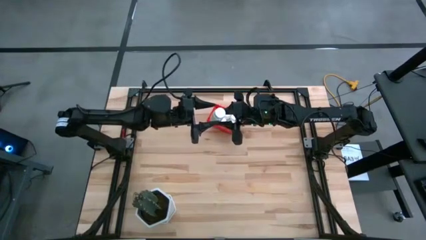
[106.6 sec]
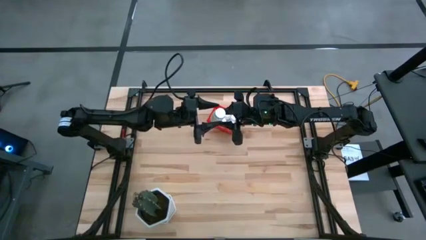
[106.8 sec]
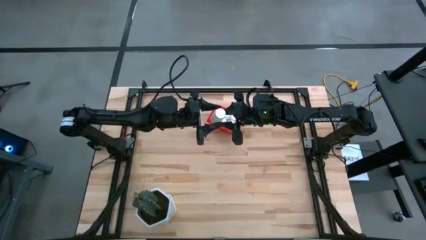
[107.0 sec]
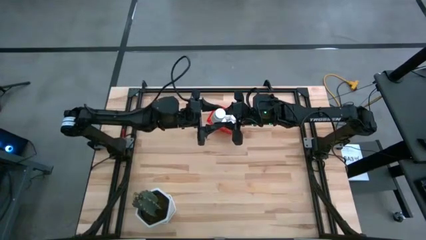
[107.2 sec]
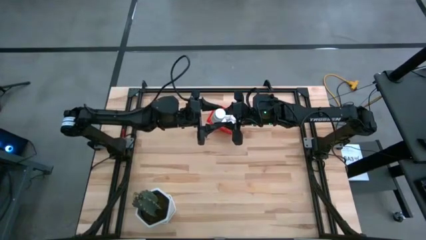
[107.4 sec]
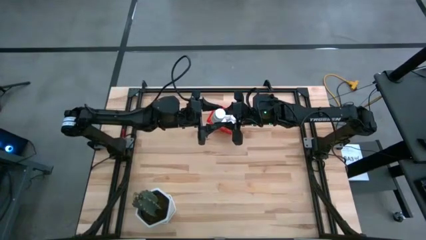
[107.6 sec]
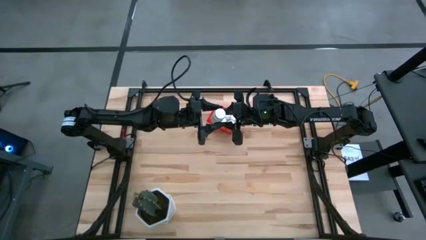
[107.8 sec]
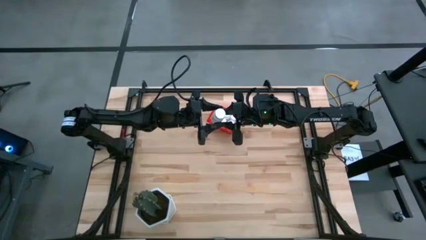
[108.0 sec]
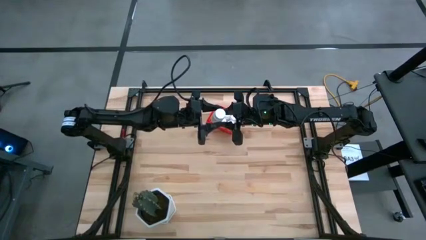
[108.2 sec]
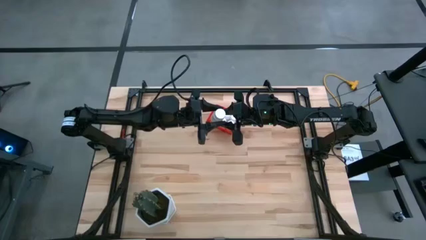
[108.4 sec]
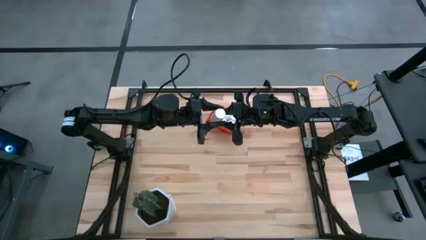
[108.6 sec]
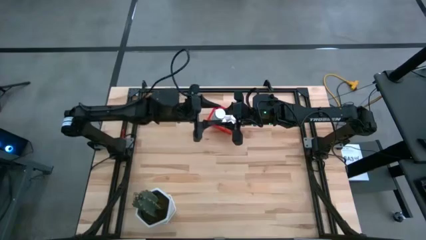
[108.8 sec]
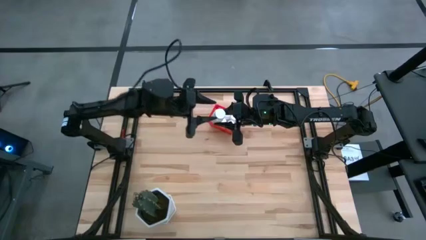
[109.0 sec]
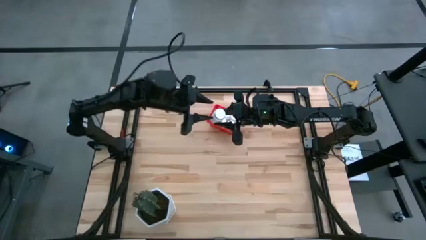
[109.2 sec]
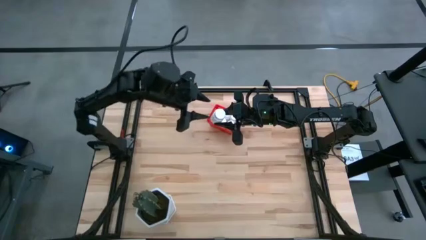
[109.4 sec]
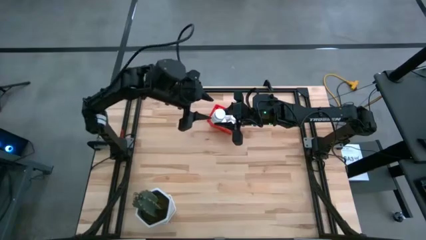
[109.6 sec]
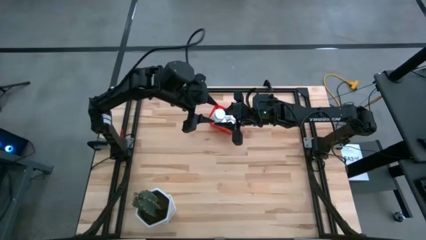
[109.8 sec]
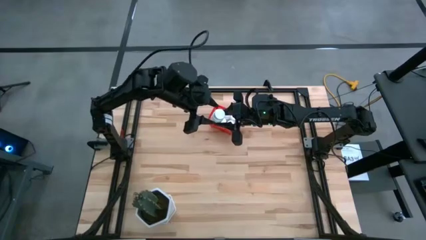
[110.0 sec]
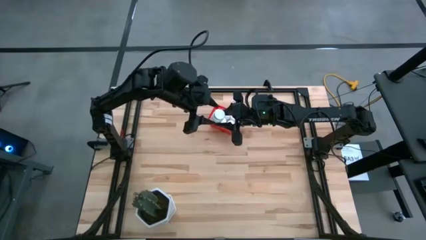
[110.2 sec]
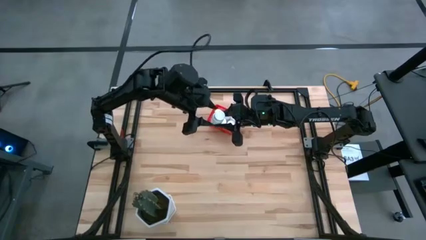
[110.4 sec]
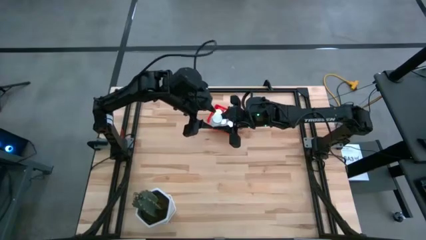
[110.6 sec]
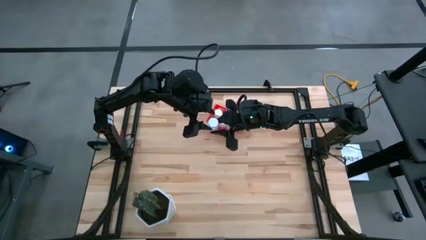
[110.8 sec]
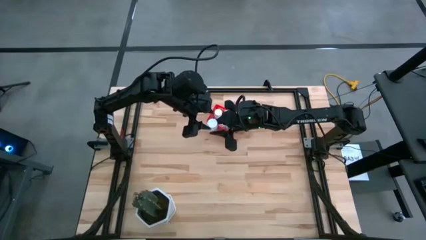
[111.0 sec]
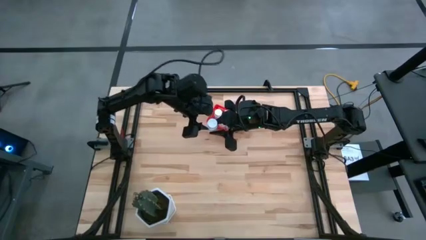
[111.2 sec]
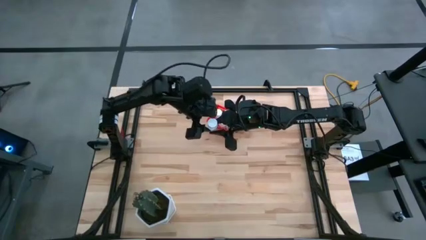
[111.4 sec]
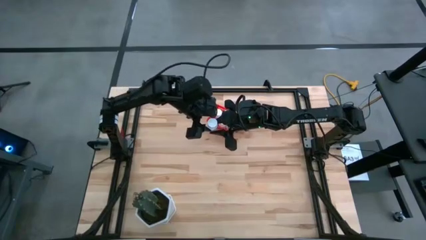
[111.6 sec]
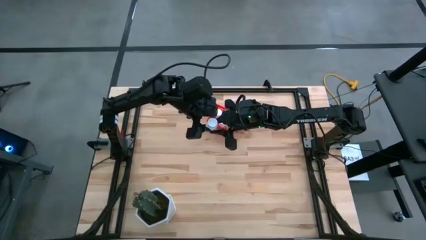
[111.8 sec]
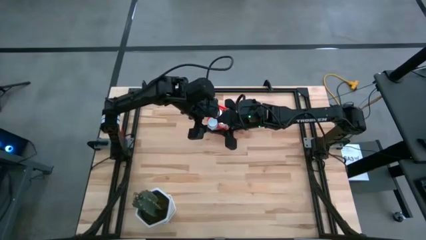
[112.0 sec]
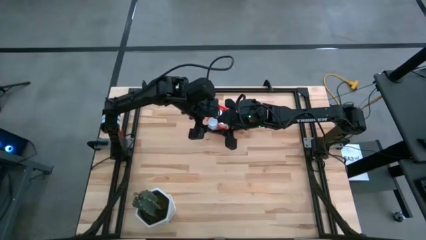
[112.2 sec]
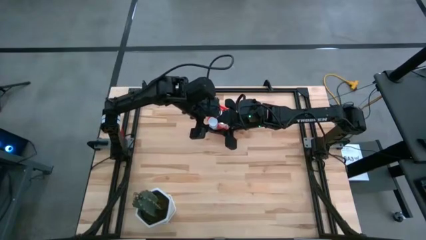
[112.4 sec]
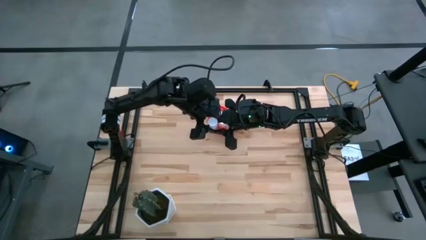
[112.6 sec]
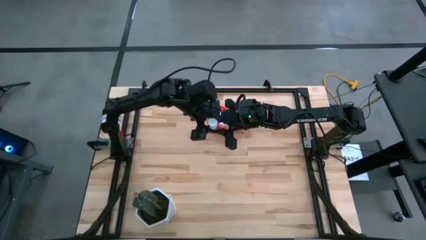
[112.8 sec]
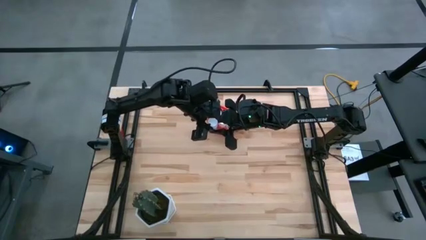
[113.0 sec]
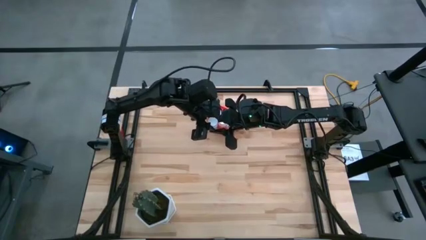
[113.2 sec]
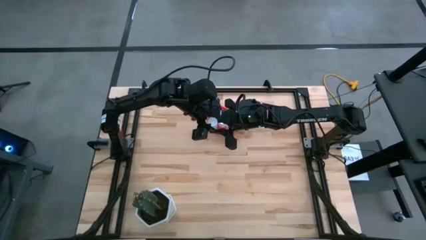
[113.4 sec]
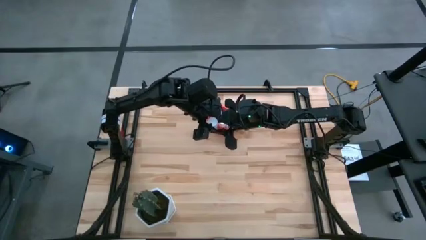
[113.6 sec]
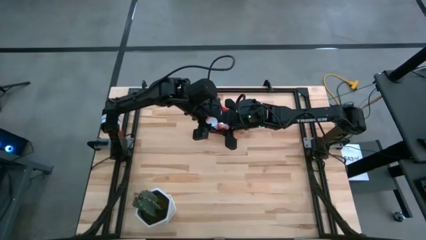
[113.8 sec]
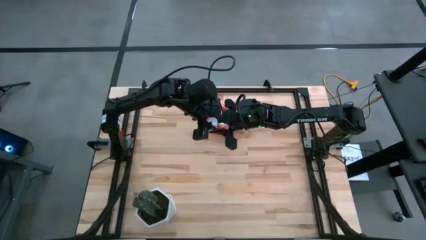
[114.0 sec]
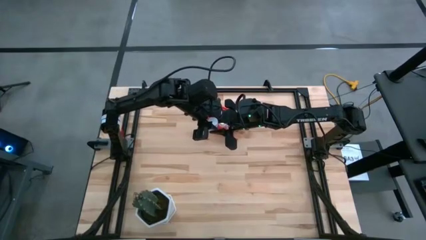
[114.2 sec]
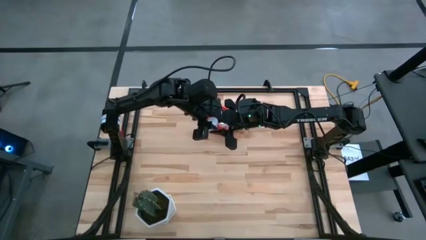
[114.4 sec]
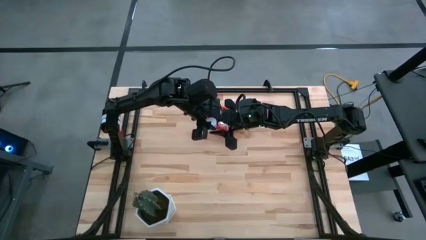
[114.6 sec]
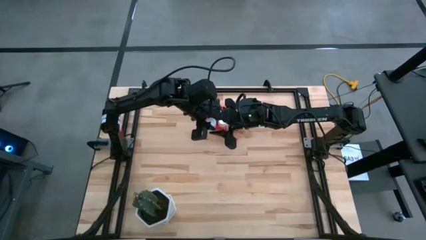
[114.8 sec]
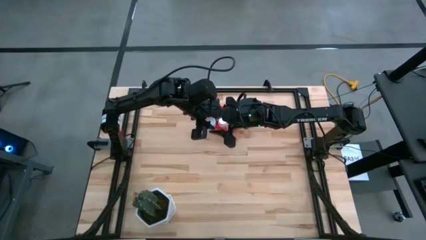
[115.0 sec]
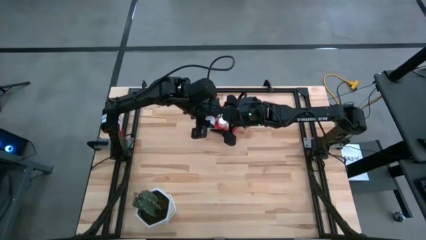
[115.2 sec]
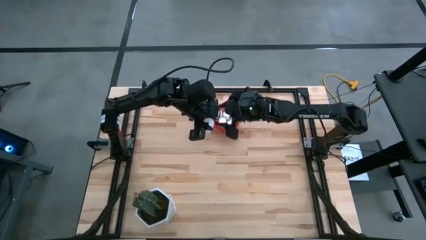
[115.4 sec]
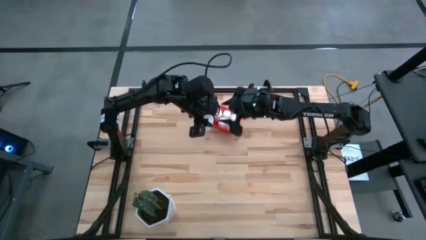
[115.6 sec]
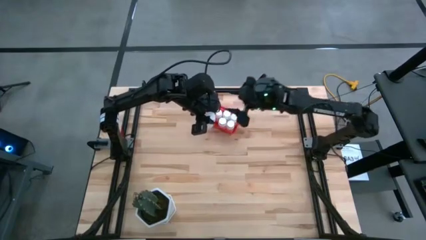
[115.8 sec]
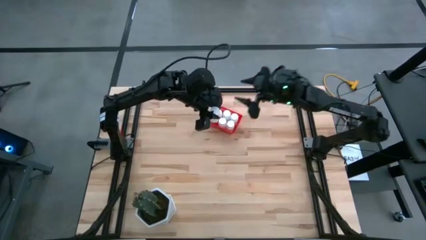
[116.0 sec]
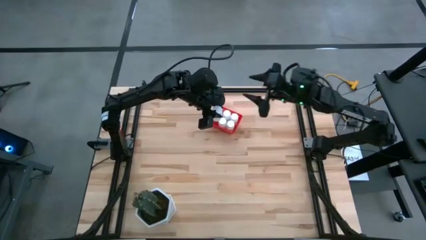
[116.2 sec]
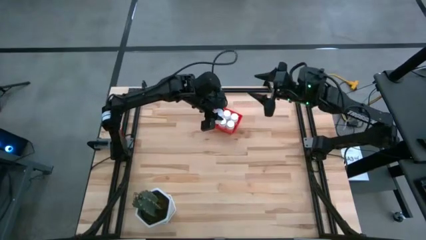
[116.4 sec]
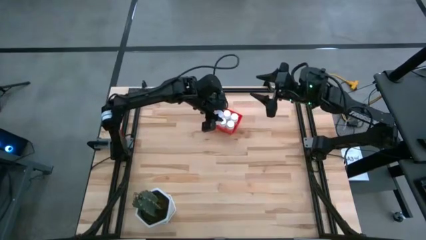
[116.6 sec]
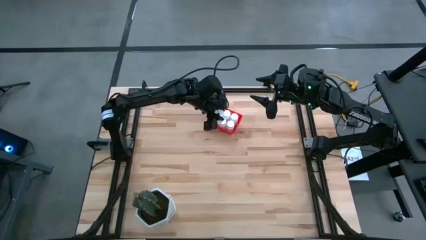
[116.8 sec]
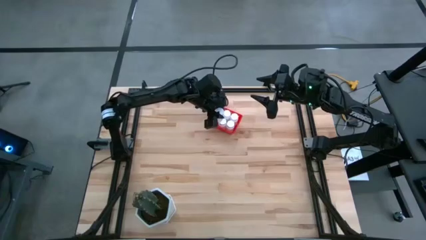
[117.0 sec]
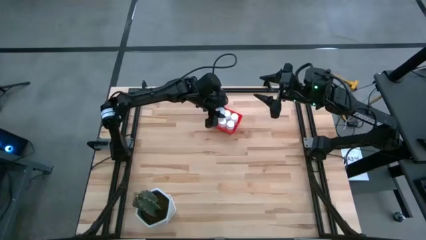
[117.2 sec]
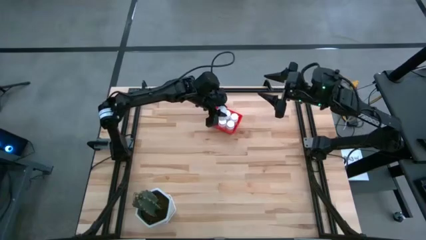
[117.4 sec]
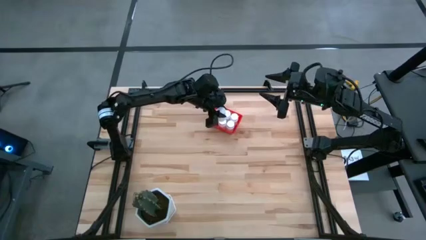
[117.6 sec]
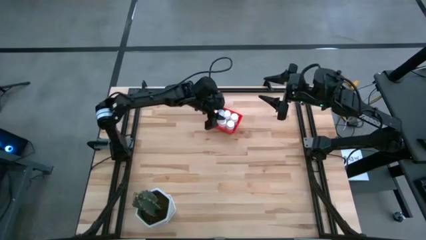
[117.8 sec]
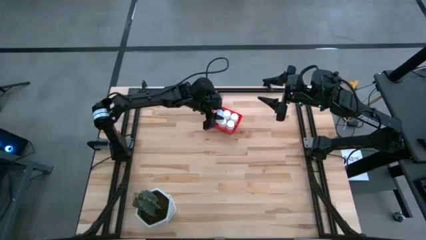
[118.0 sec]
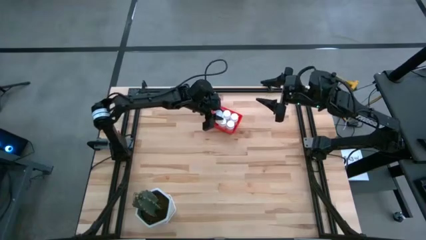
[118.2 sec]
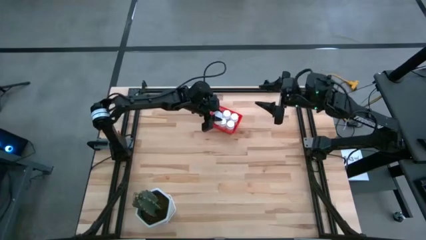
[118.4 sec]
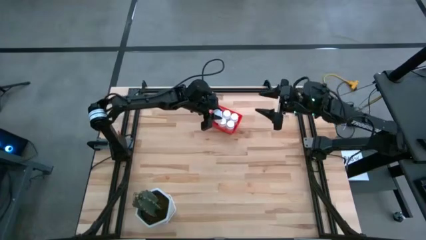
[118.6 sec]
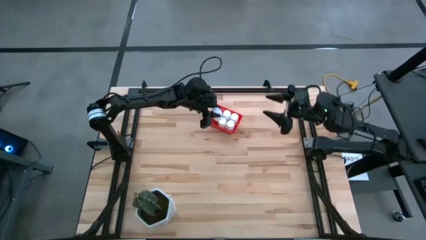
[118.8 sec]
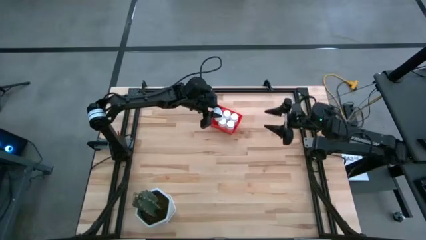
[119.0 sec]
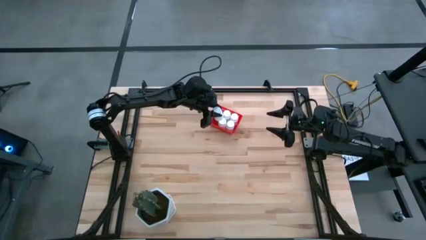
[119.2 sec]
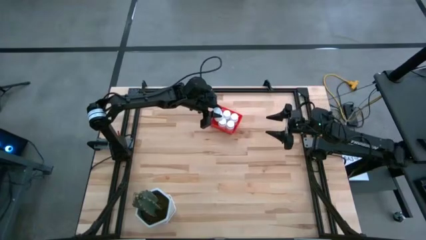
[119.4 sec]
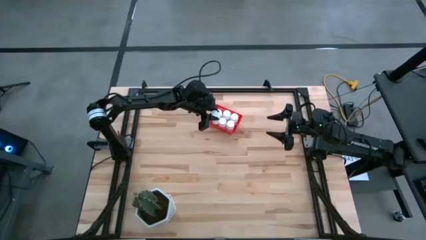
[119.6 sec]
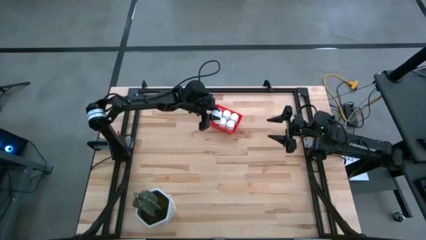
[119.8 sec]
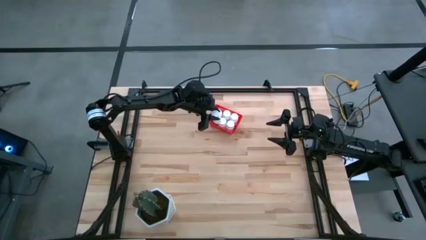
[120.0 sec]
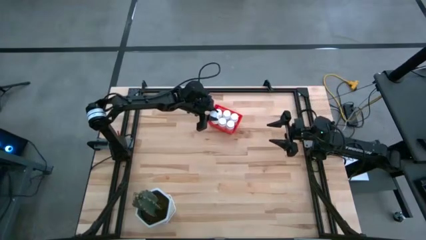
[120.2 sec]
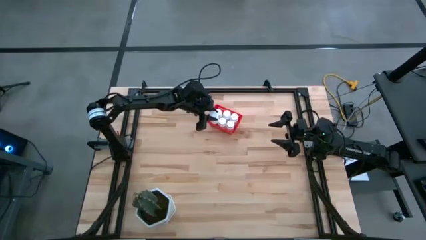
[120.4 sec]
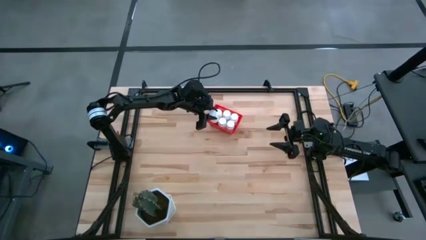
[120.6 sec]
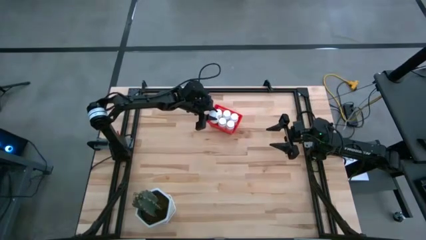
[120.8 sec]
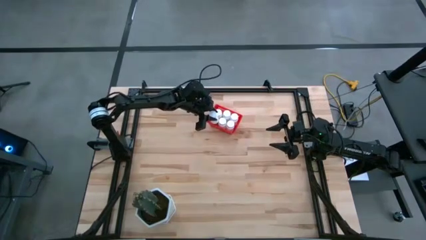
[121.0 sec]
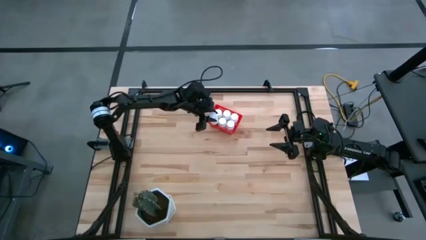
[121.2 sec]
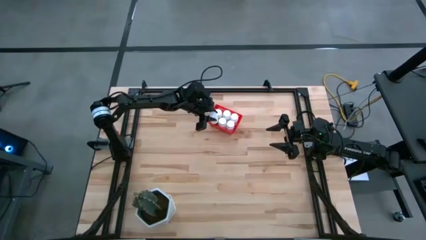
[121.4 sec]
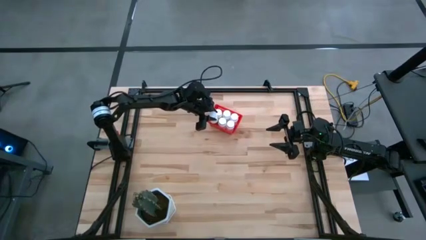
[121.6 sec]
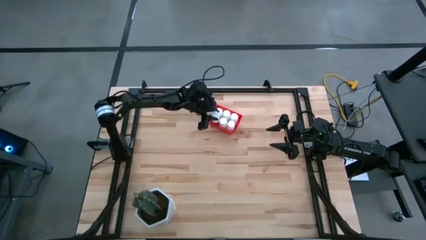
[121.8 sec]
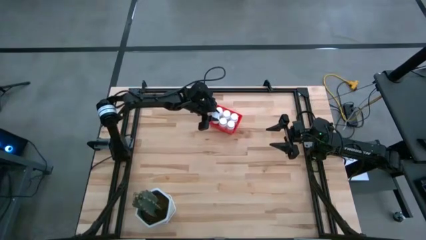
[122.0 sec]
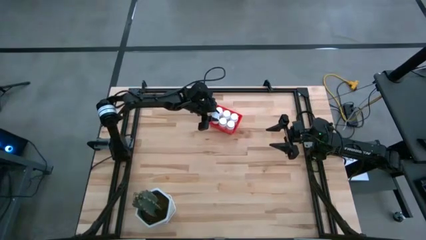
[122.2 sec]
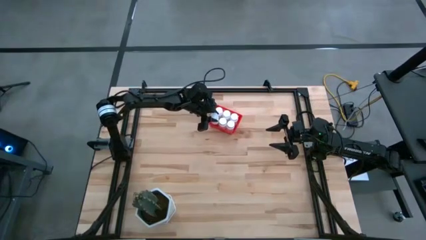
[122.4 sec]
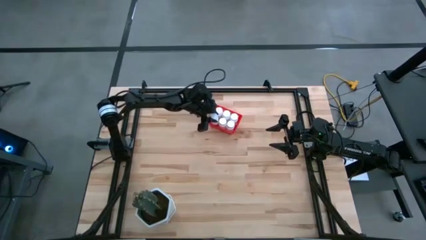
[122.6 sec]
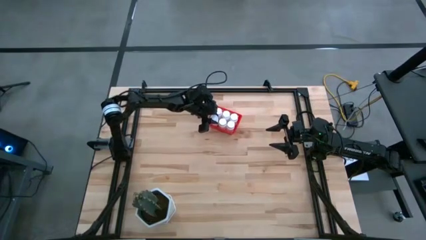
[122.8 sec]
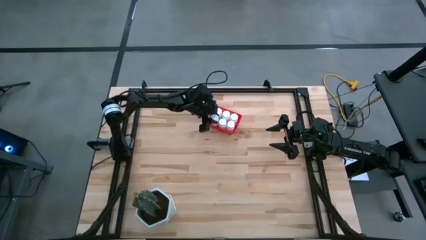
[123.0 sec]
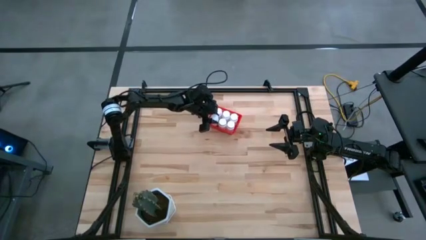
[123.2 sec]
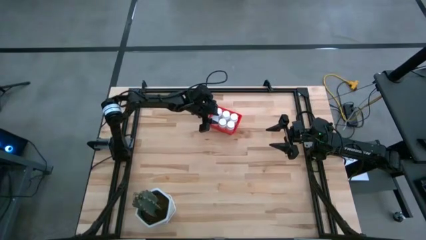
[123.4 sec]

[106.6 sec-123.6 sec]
Task: Pick and place pill bottles into a basket
Put the white pill bottle into the red bin
